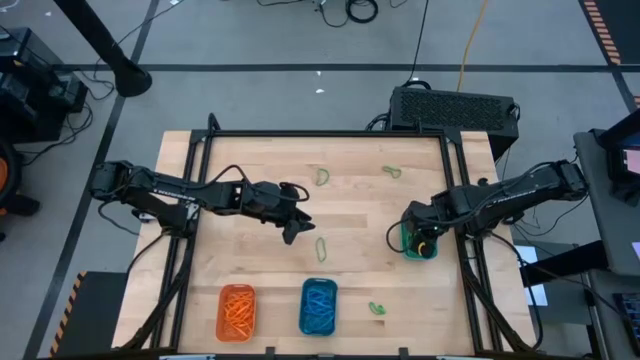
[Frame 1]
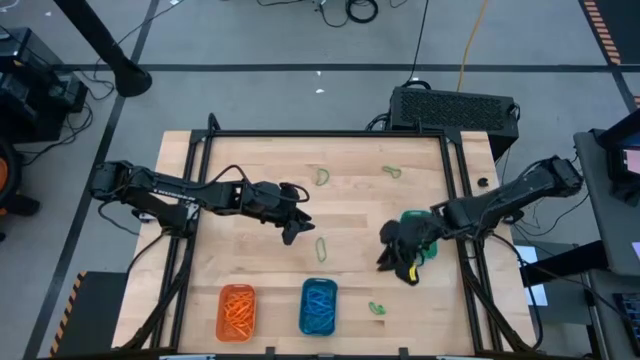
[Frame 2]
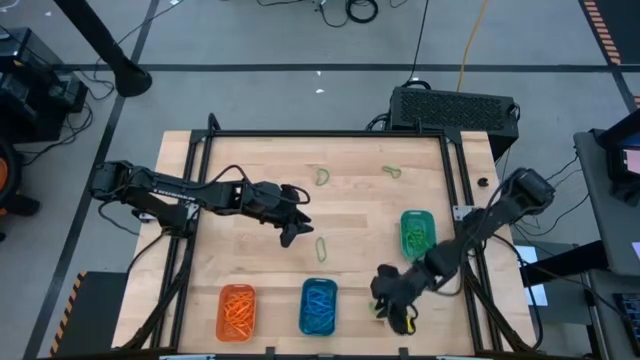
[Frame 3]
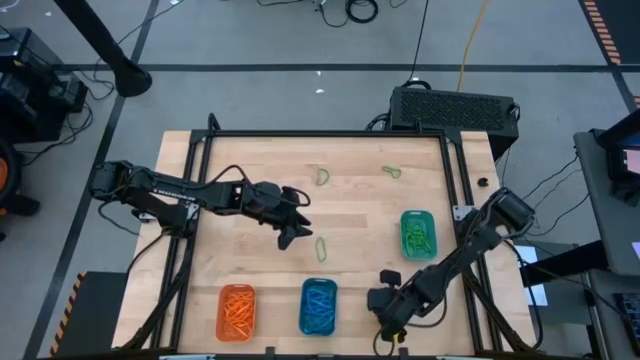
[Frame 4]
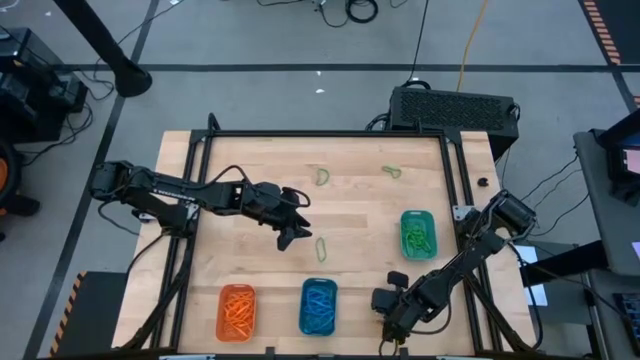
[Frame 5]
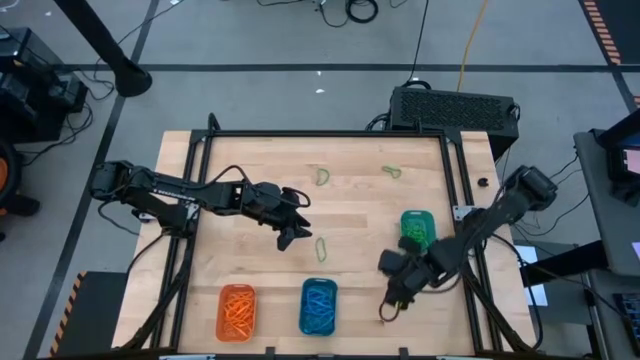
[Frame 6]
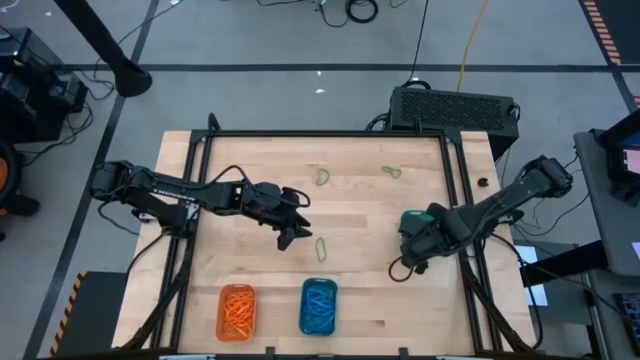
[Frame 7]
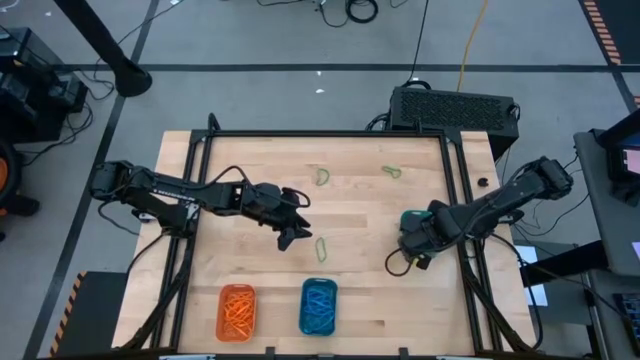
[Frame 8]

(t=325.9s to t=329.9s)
Task: Sort rubber bands into baskets
Put the green rubber band into the green bin

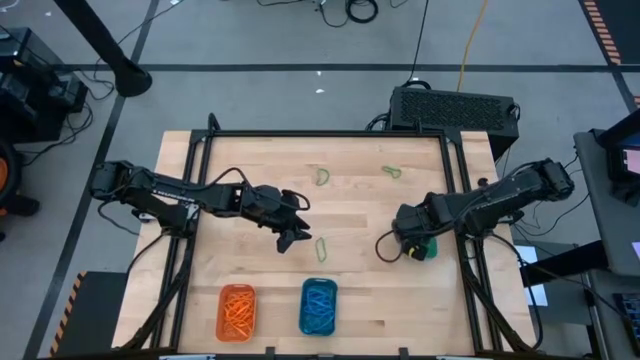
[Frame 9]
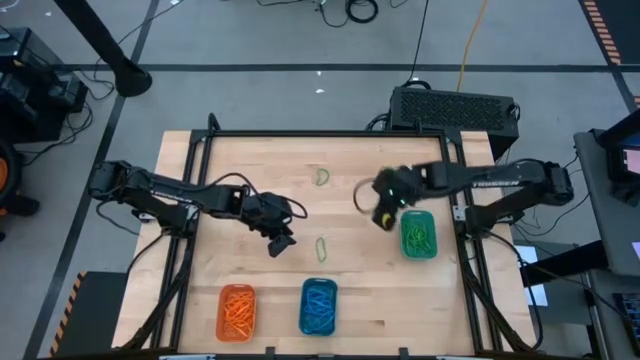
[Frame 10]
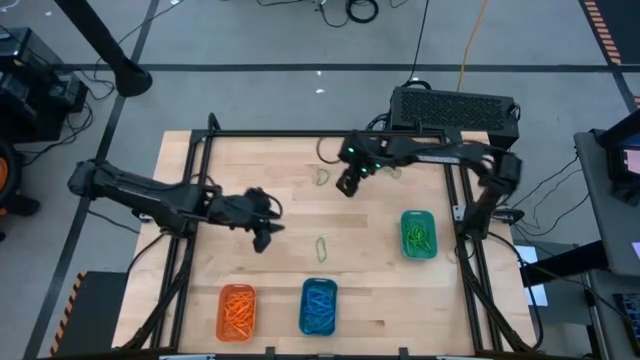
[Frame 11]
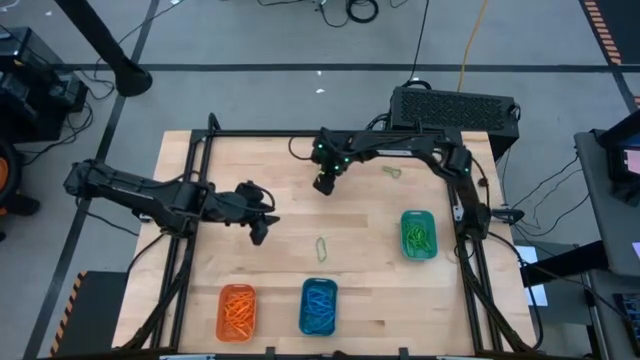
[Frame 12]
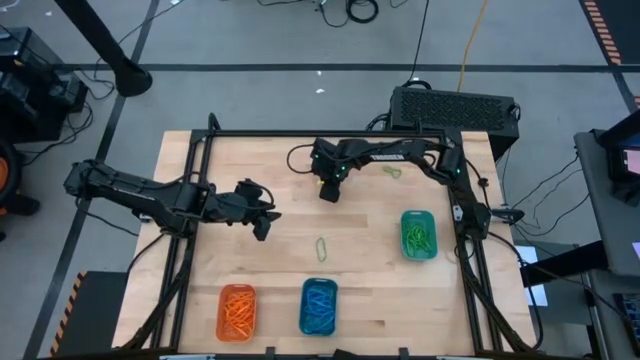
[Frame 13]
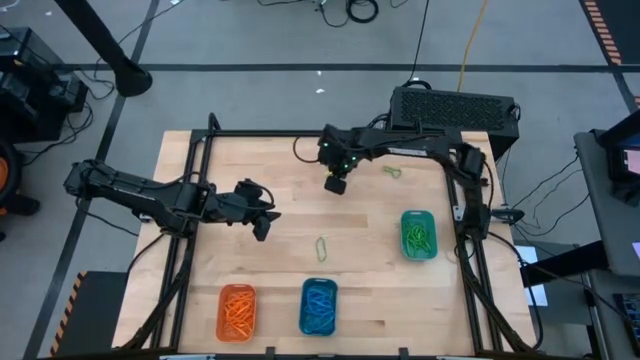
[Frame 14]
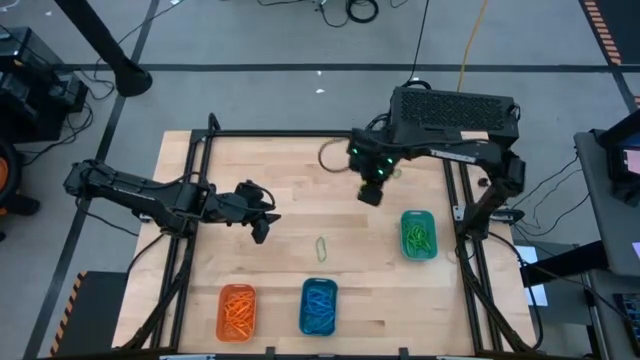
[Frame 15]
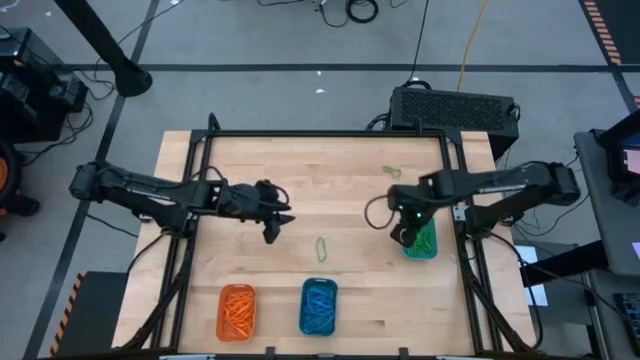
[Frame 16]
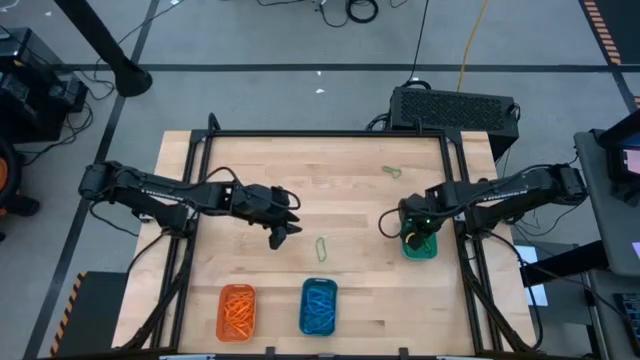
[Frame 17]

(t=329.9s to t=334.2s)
Put the green rubber band into the green bin

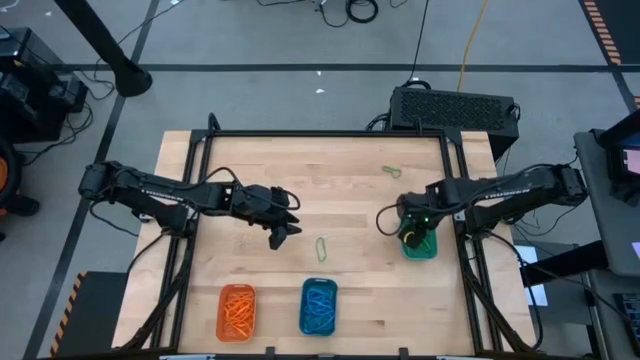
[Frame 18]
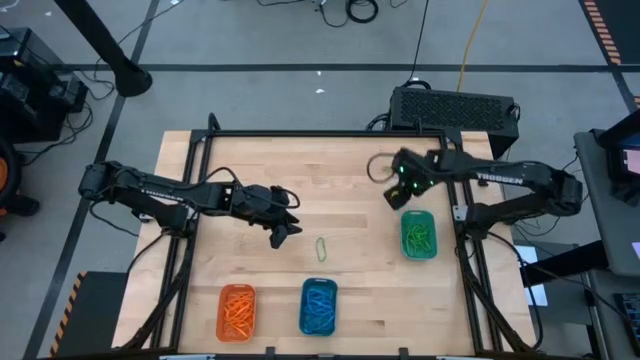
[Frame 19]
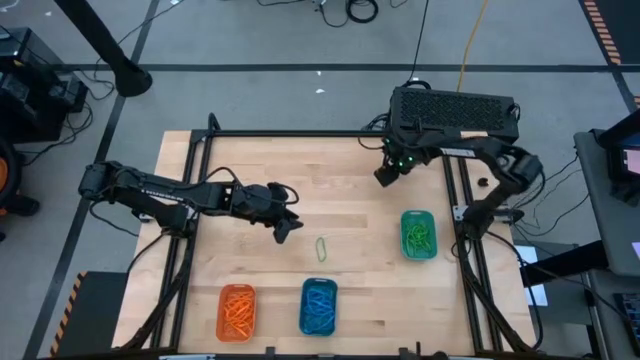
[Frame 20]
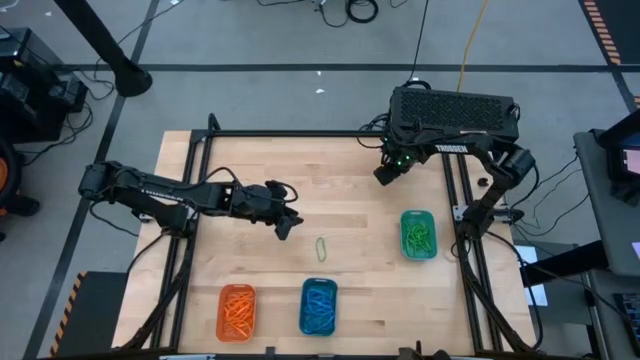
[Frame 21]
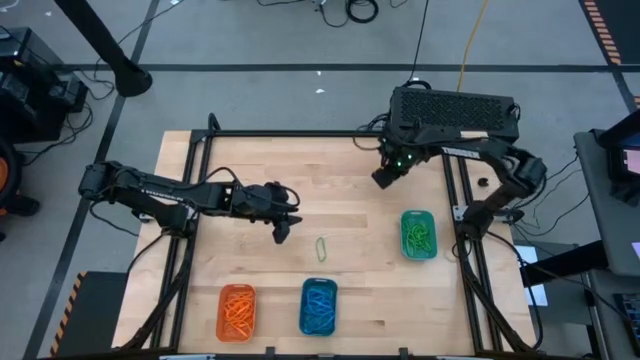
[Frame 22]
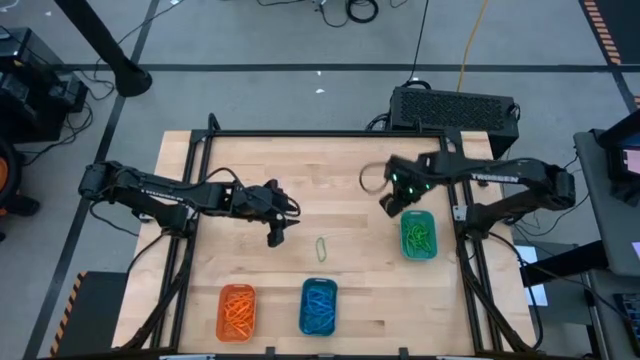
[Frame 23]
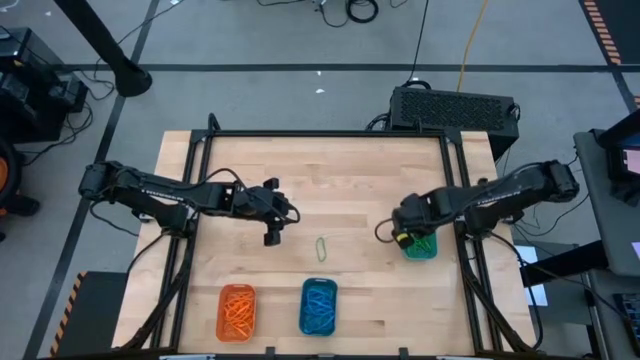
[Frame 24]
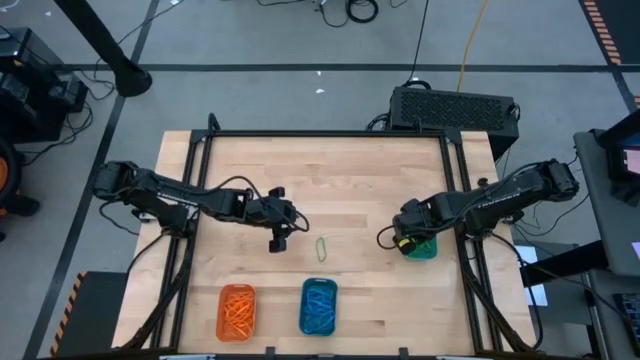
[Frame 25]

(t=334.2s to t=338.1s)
Put the green rubber band into the green bin

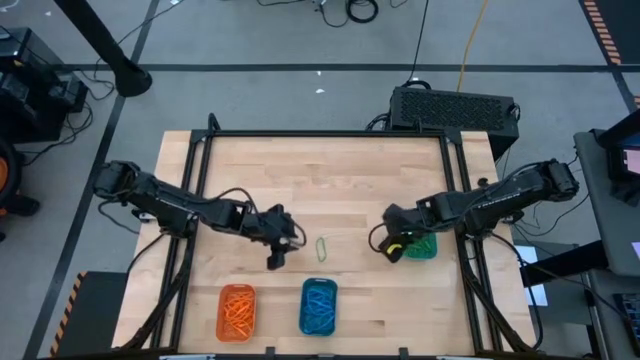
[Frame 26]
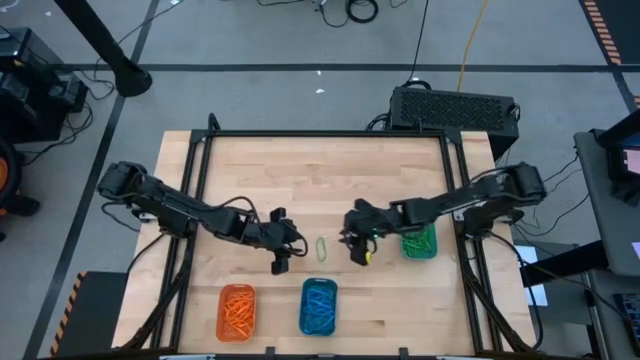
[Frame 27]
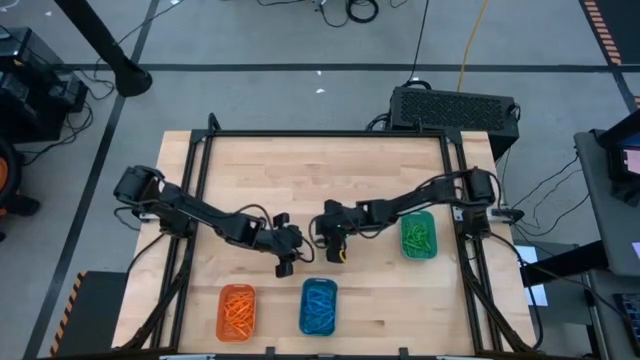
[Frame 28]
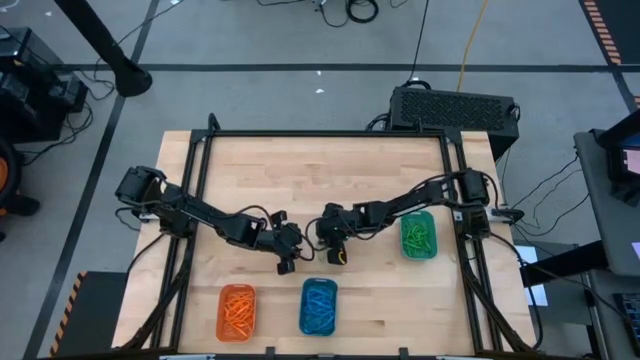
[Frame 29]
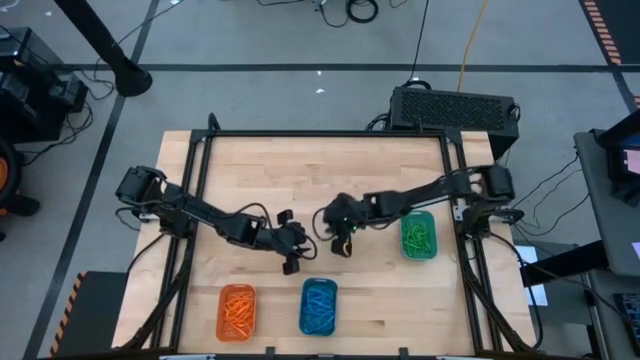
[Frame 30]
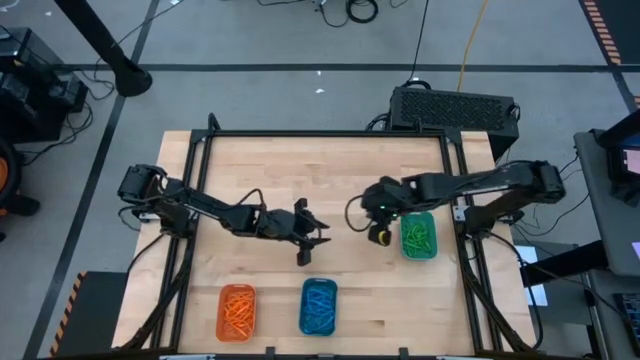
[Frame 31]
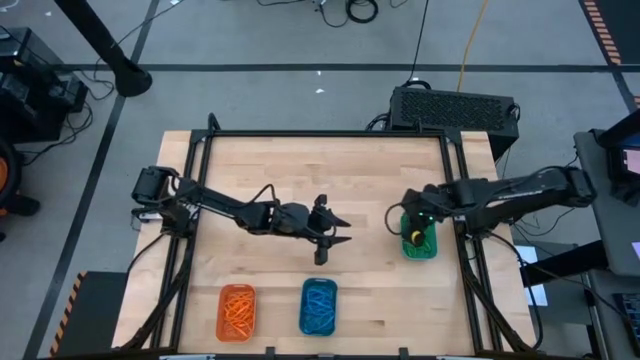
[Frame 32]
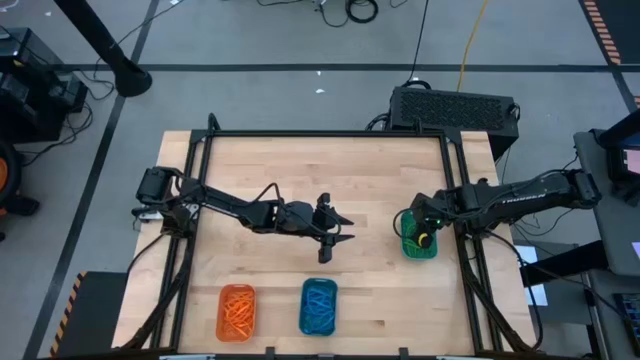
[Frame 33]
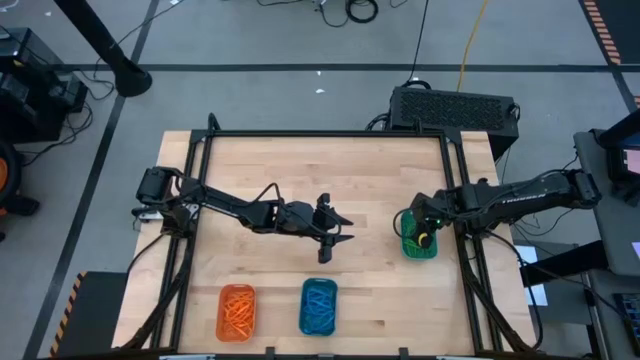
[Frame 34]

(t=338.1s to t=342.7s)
Put the green rubber band into the green bin

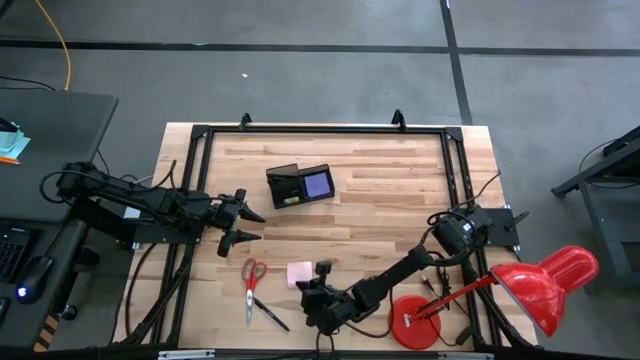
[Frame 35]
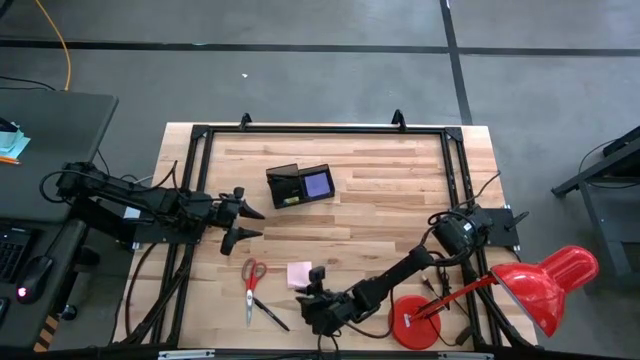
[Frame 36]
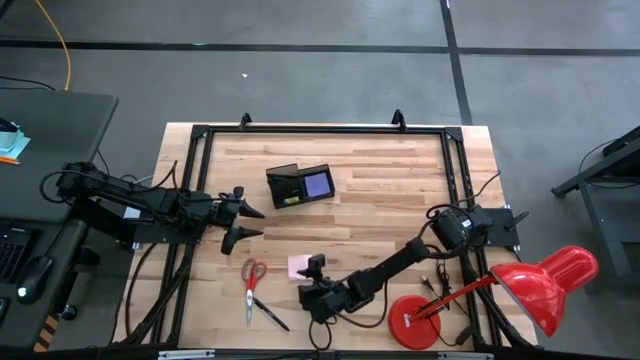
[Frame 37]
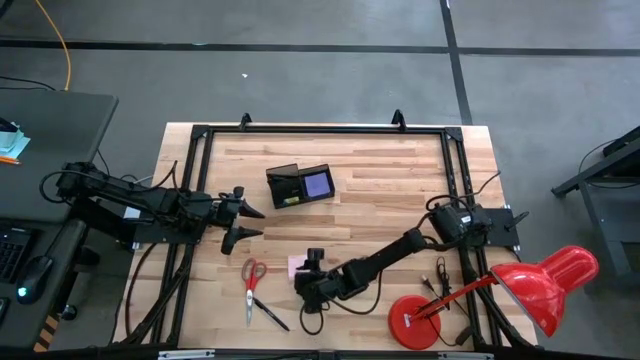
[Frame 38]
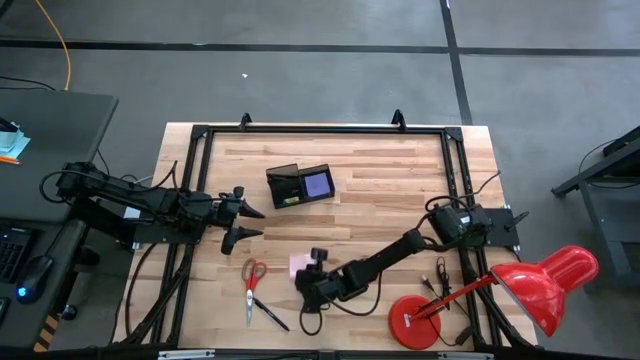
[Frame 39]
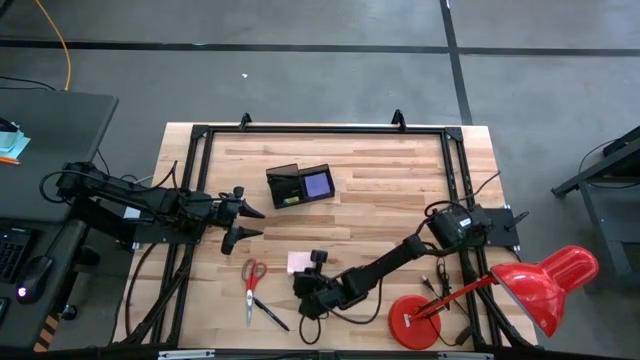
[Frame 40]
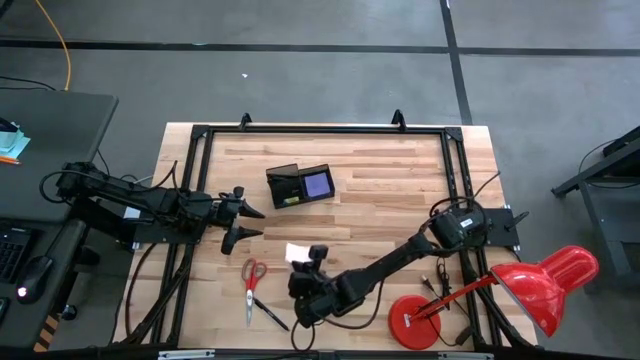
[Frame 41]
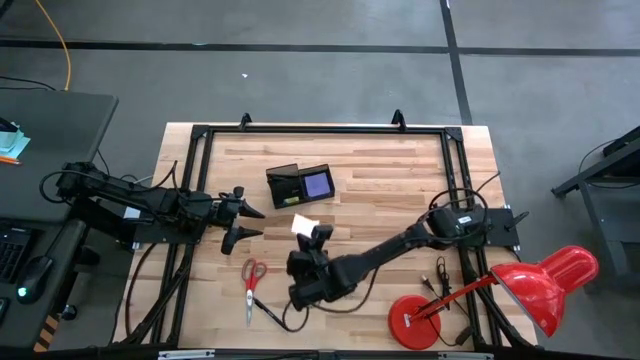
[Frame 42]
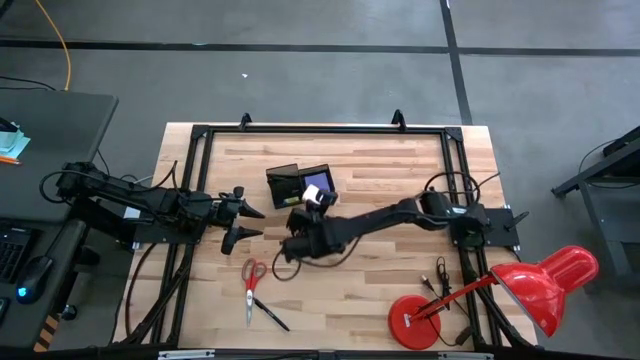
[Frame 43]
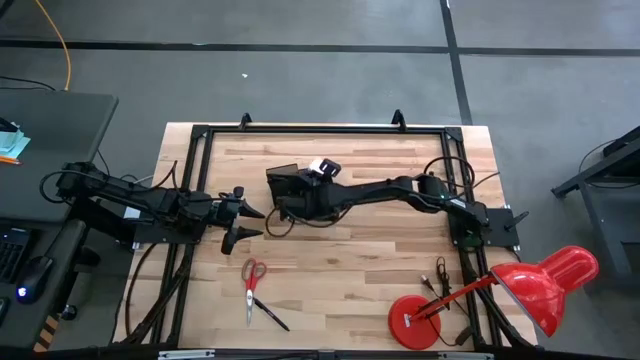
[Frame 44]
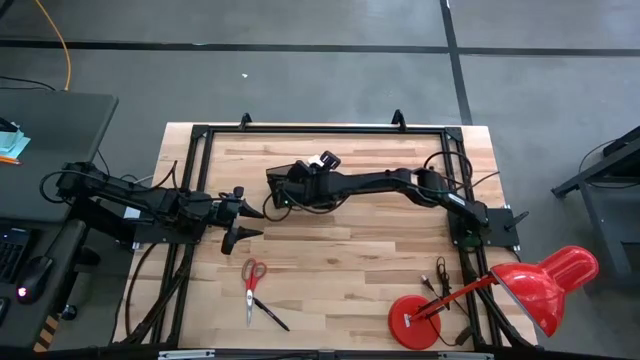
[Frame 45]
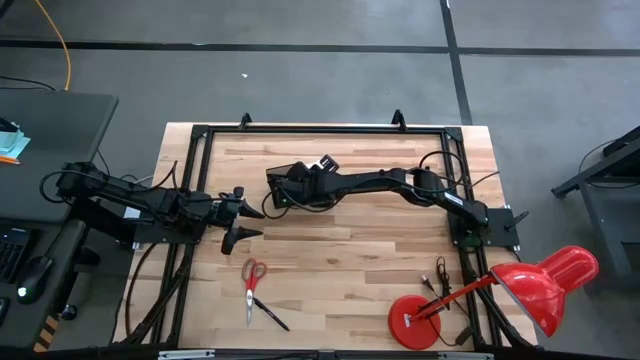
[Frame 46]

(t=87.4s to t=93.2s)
Task: Pick and place office supplies into organizer
Put the pink sticky notes into the black desk organizer
